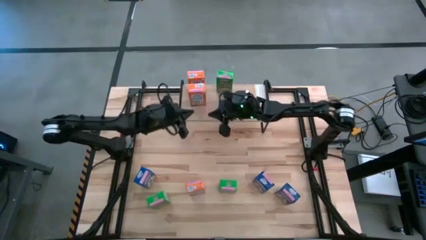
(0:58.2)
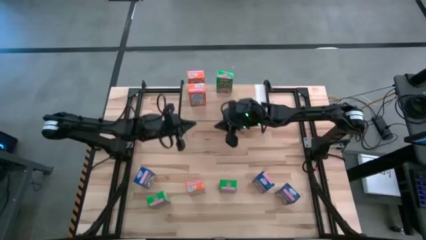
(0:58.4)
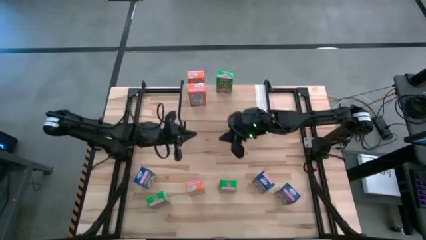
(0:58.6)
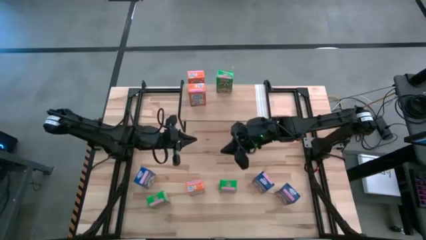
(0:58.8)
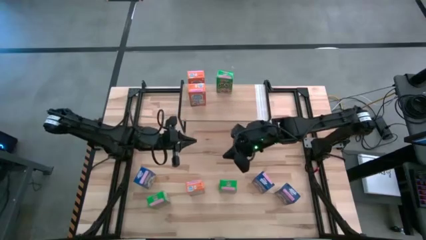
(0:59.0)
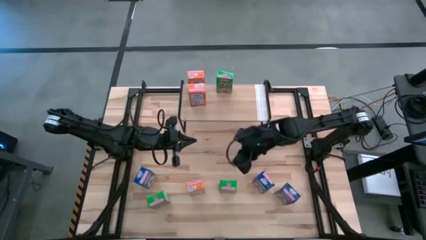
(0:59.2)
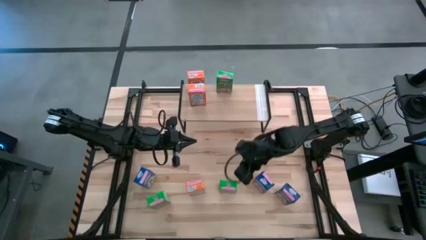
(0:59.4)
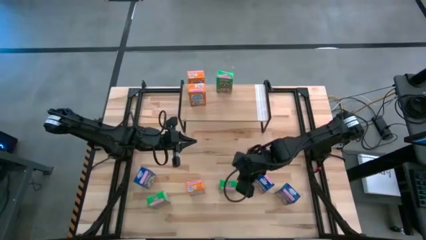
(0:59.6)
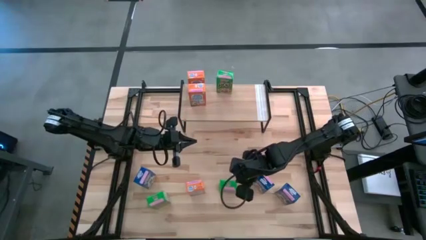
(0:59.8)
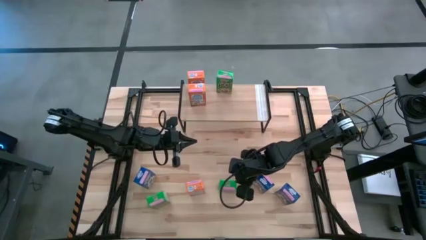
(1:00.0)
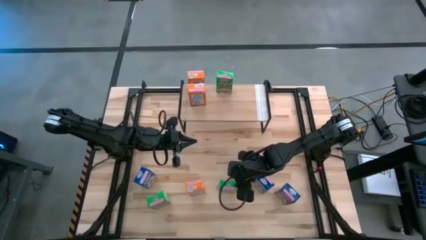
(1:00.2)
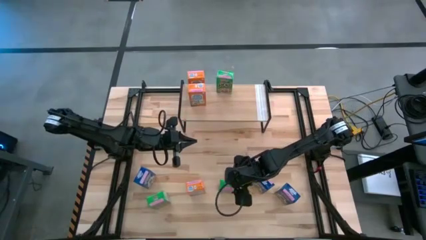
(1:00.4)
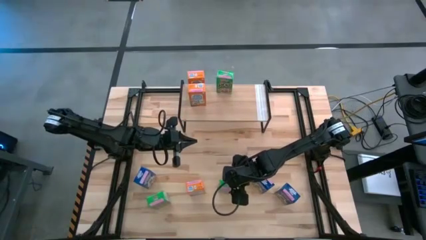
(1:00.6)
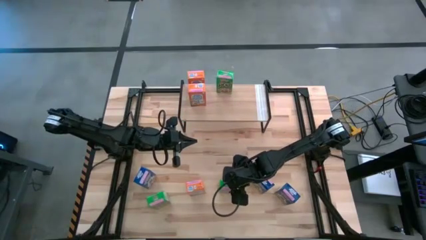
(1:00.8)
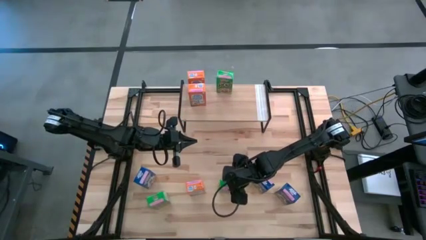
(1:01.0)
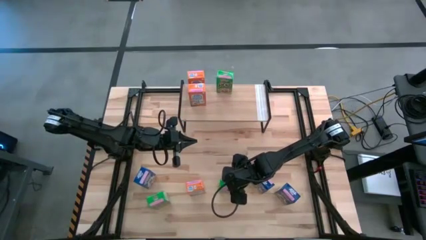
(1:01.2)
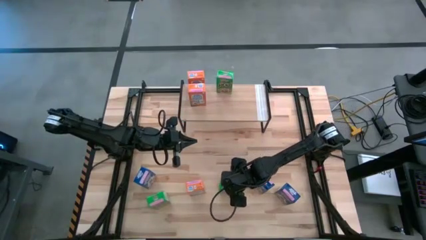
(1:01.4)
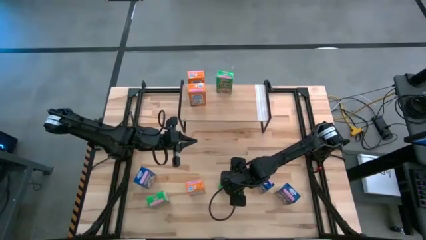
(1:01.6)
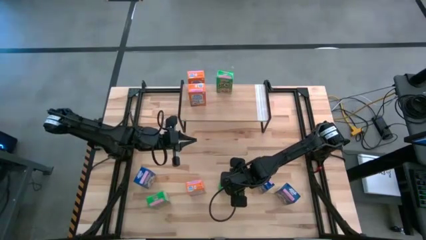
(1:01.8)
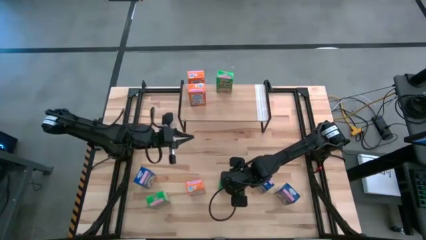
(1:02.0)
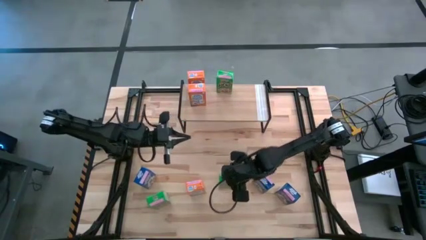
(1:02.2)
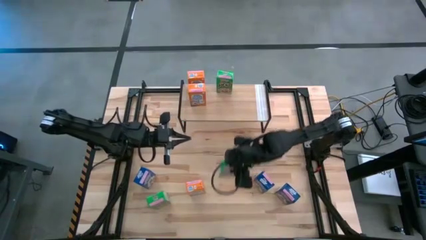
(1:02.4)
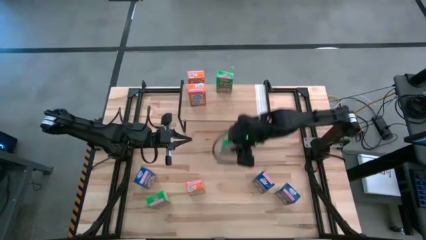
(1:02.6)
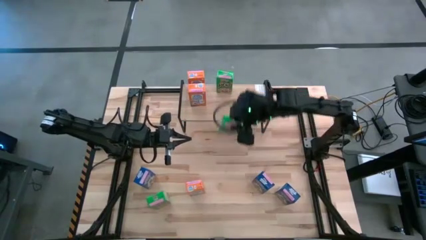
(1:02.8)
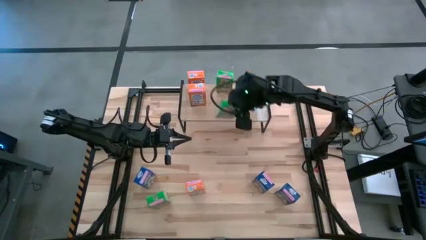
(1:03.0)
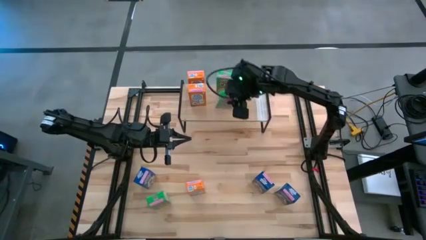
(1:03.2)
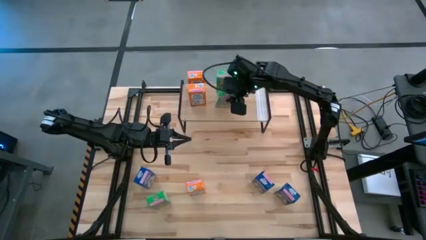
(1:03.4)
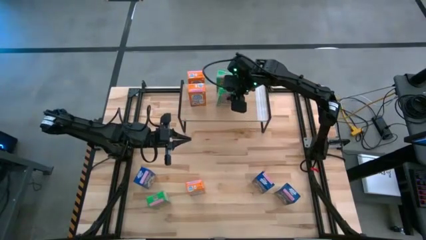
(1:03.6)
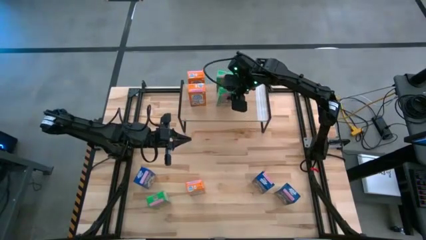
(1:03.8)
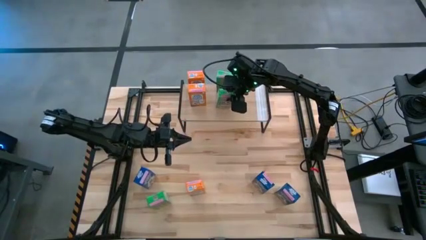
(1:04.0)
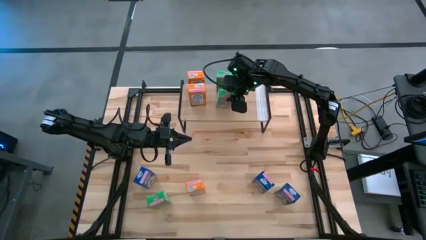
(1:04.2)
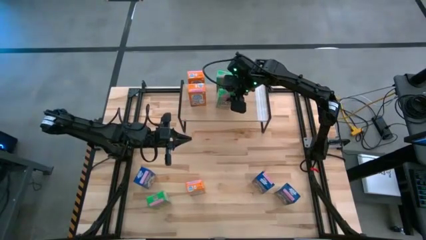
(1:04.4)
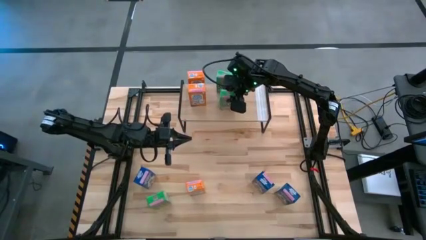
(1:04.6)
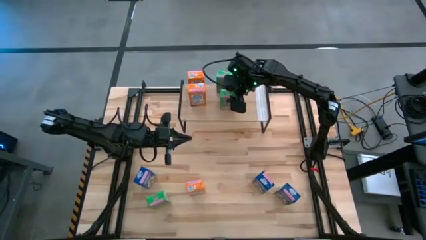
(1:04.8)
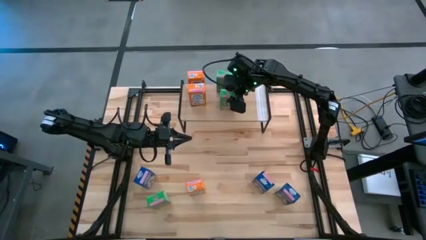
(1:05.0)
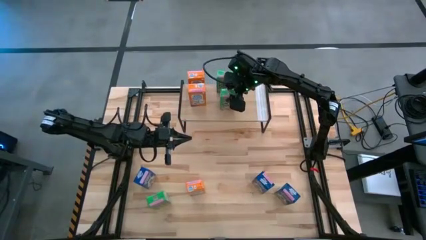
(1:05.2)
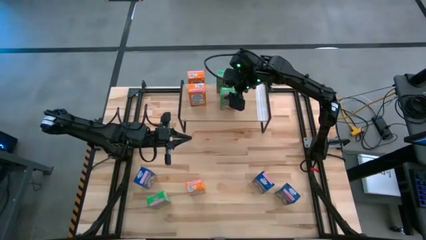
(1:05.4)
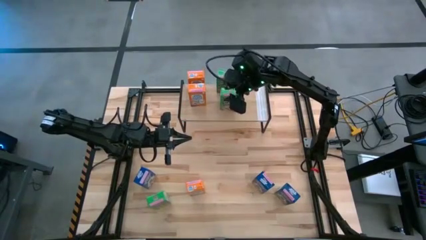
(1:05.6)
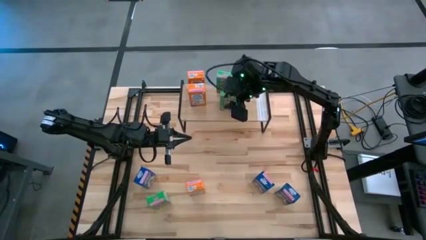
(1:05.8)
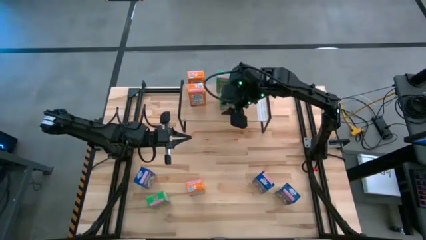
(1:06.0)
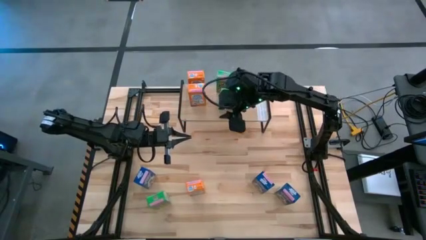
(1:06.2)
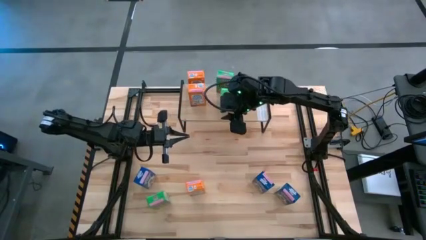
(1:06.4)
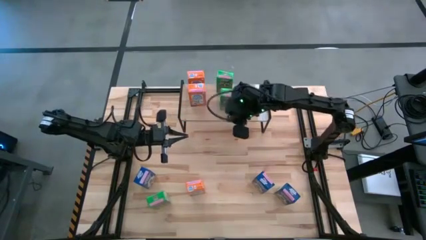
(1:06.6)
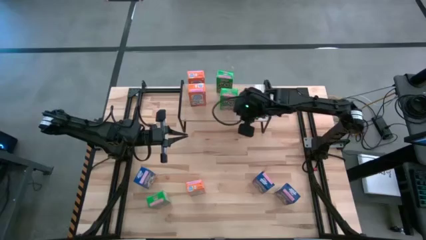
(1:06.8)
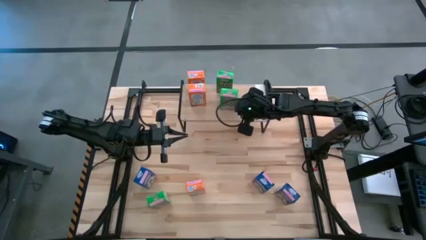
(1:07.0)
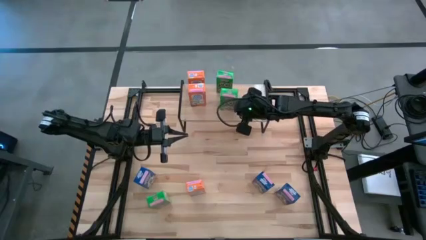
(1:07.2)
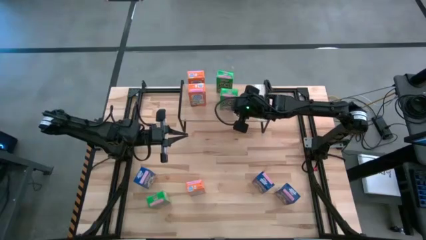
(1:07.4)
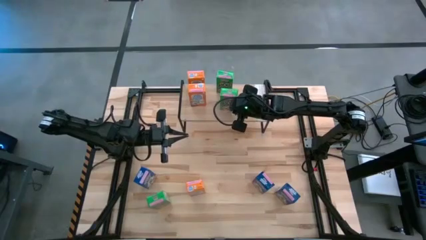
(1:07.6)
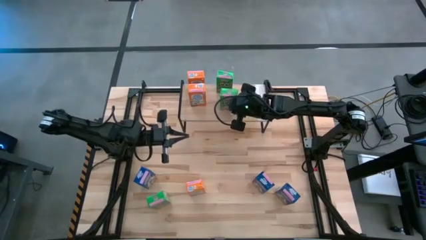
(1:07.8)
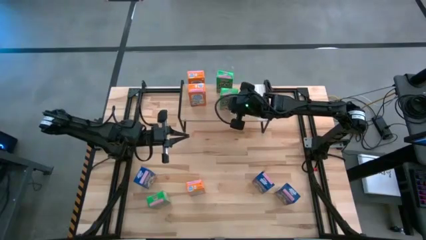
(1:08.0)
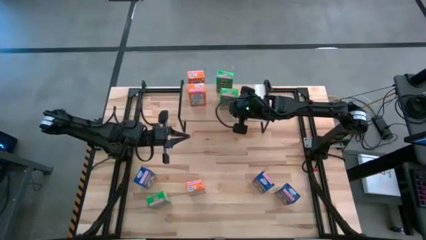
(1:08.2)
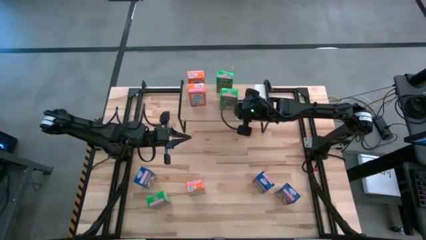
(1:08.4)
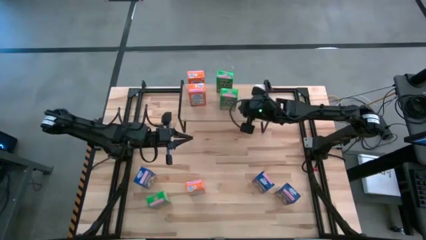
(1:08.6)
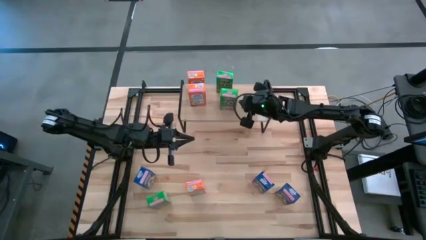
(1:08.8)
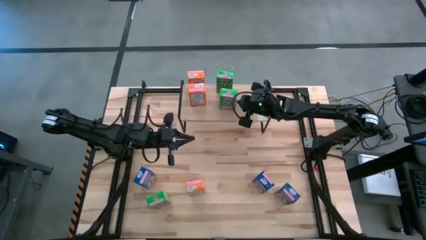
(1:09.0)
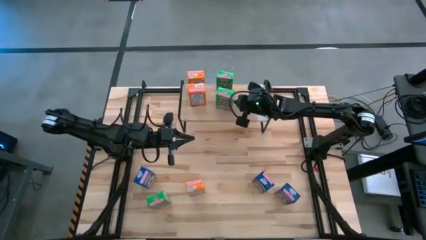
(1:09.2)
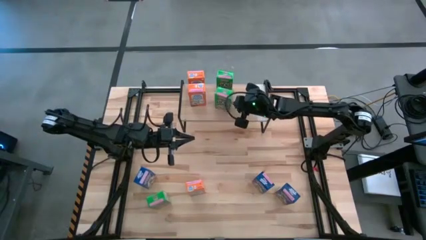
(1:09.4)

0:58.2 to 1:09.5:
Task: Stack cereal on shelf
Put the right green cereal box aligned with the other green cereal box on the shelf
